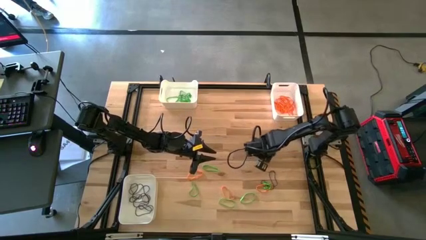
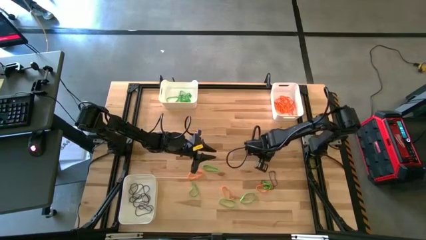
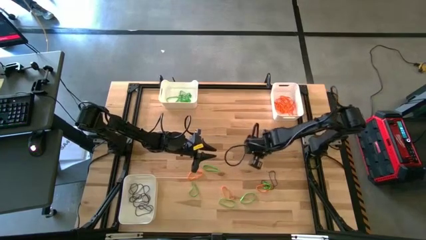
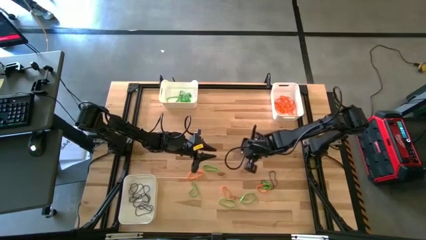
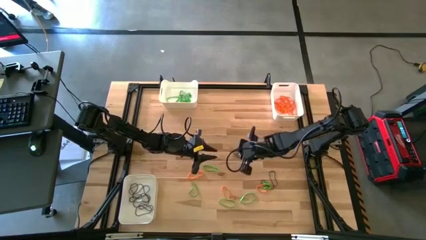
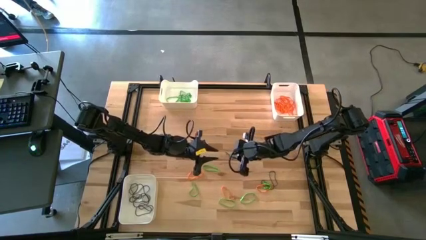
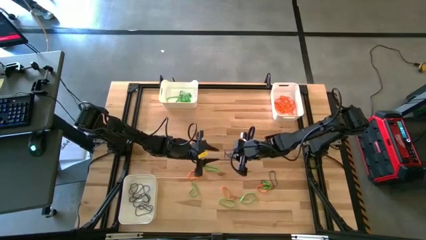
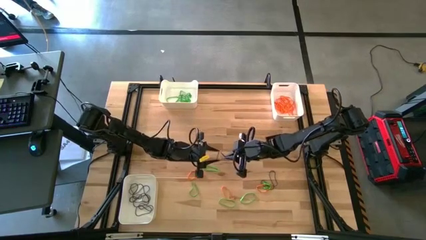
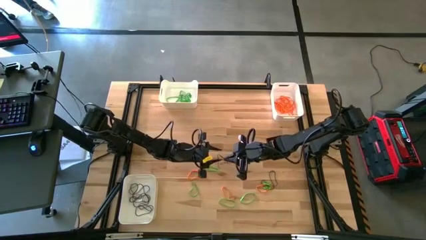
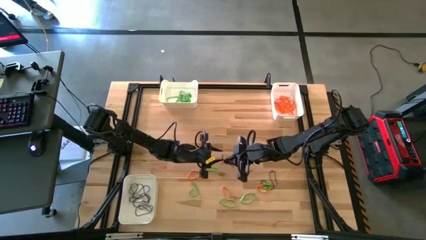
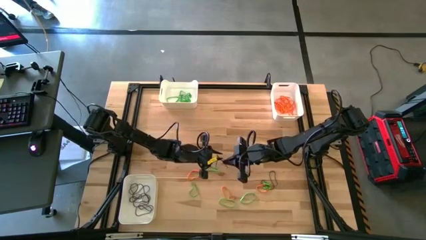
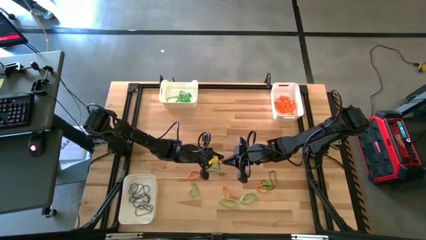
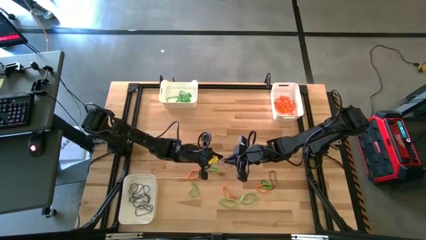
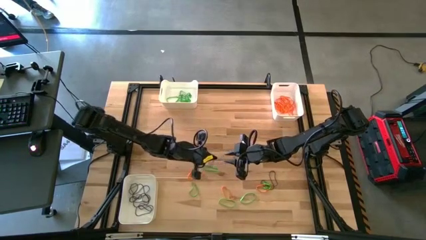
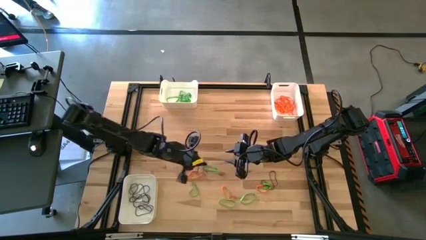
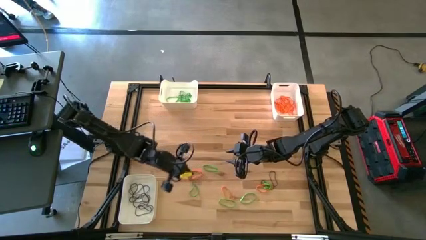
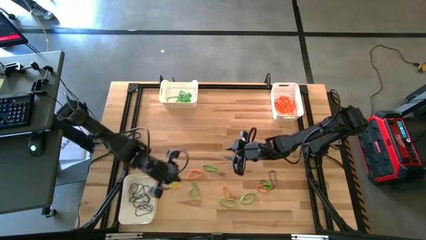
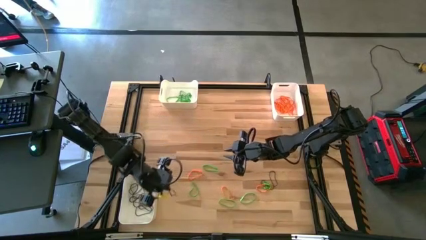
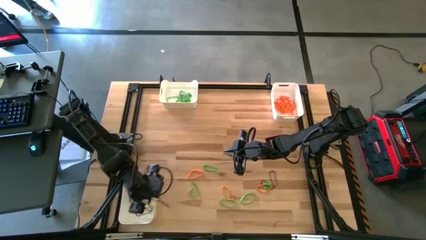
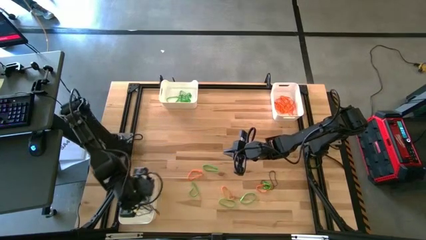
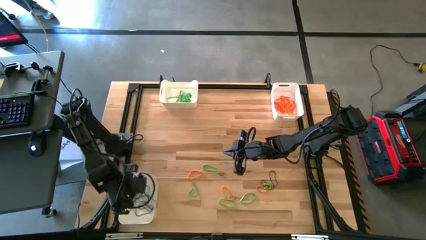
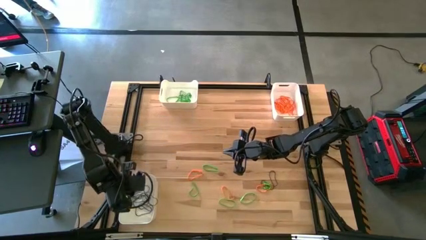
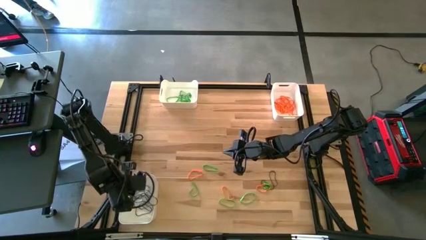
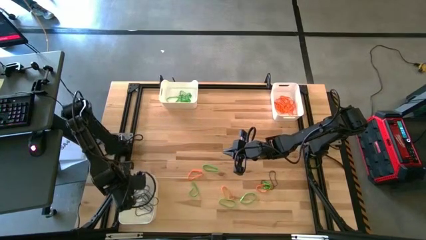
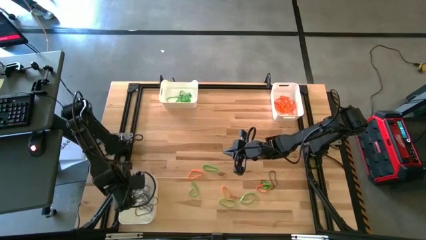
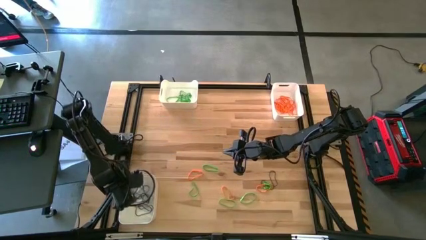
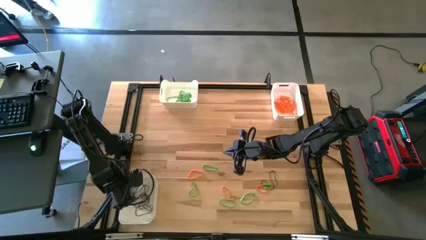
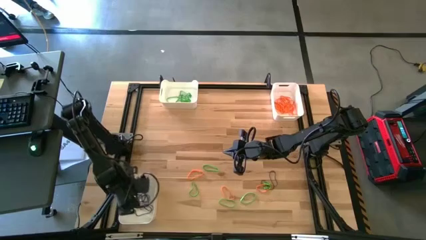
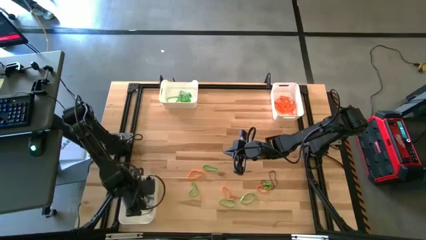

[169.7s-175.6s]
Task: Sort rubber bands into baskets
Put the purple rubber band into the bottom white bin

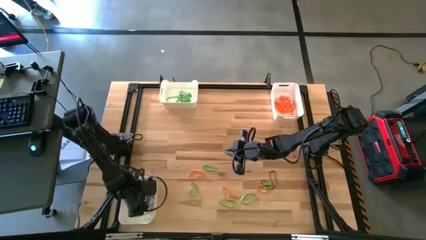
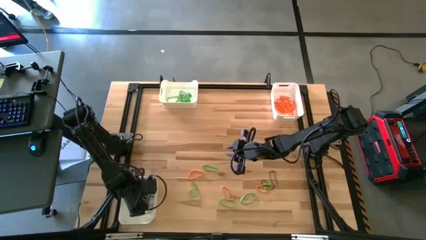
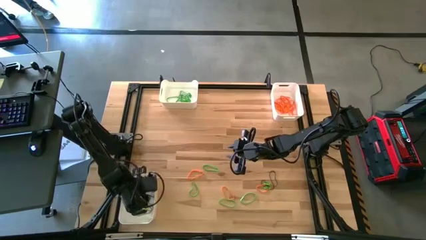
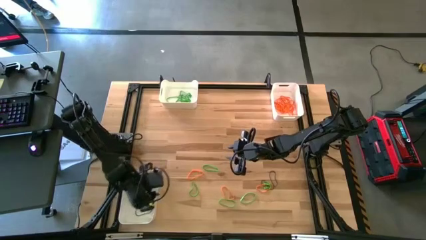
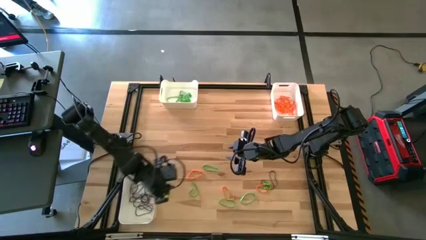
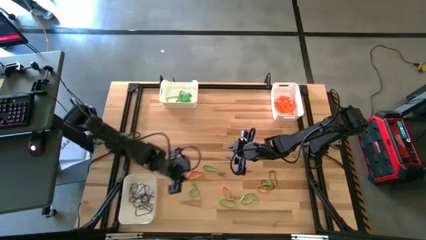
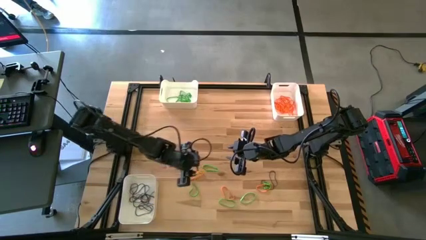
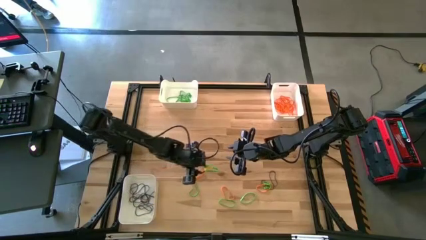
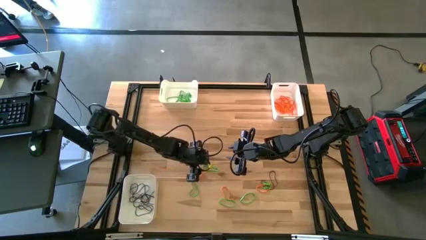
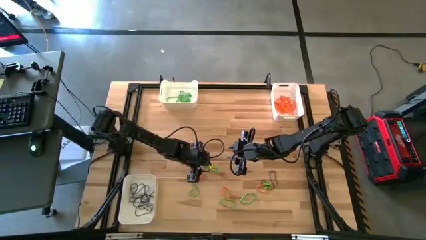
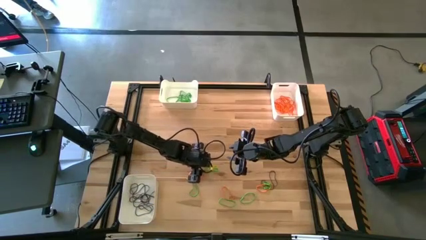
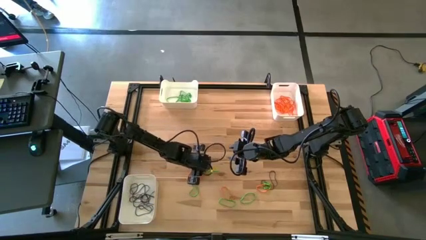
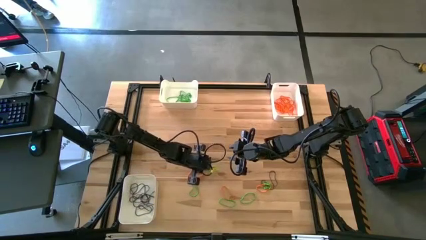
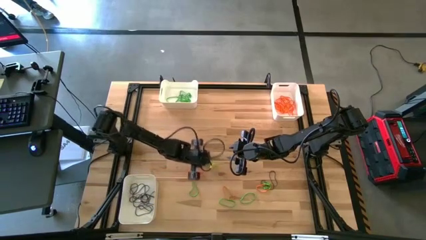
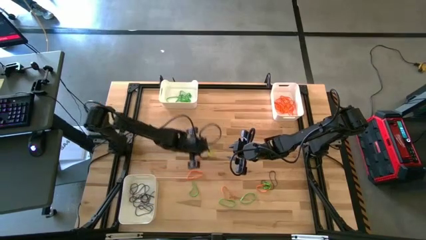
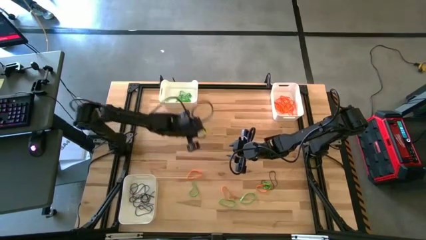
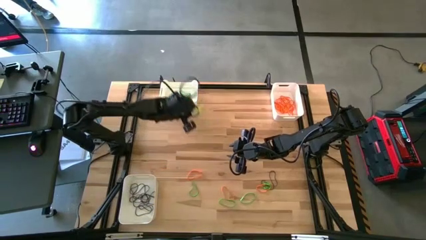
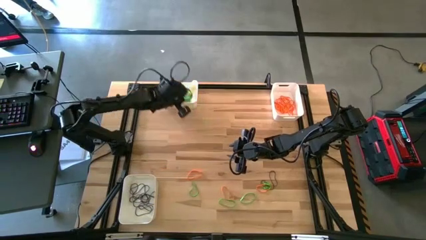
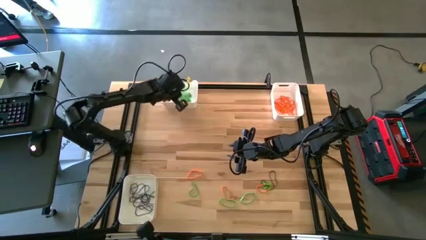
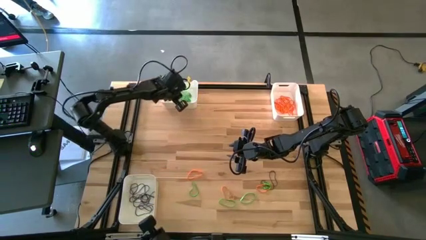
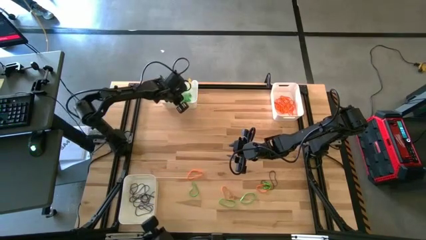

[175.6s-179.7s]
Put the green rubber band into the top left white bin

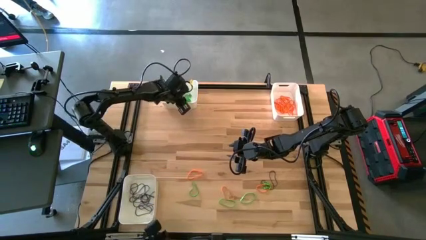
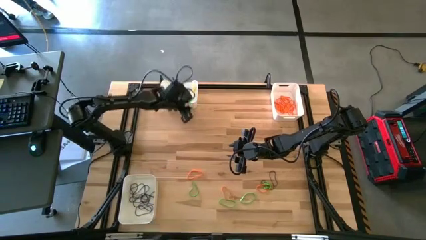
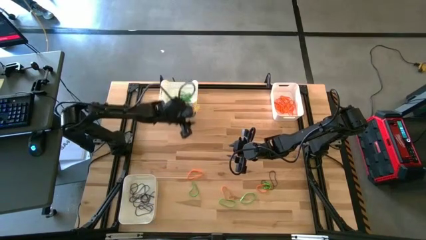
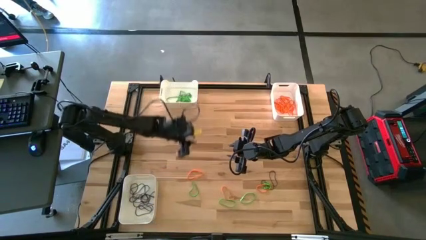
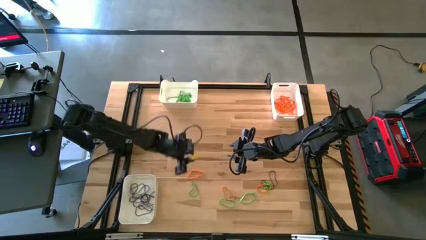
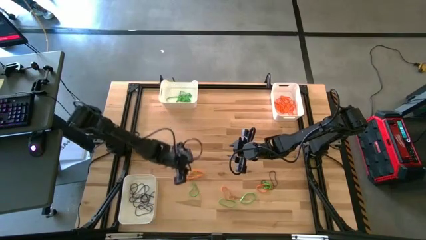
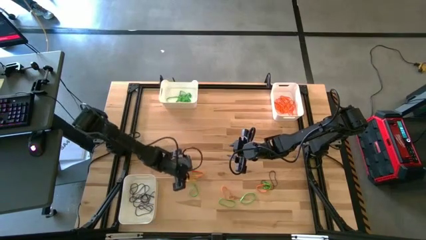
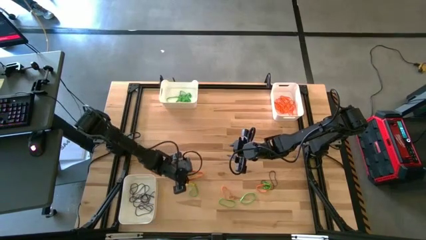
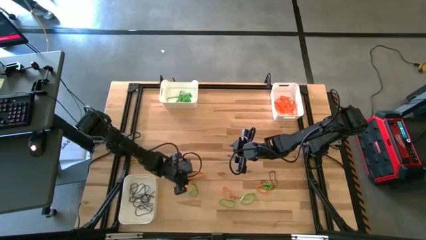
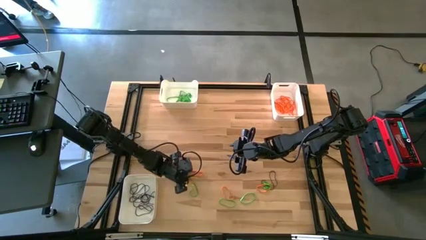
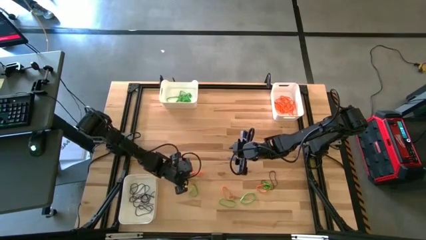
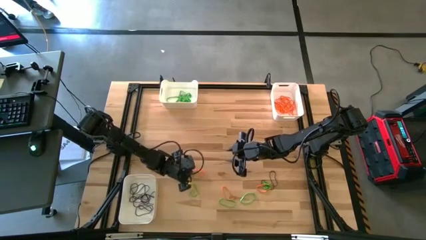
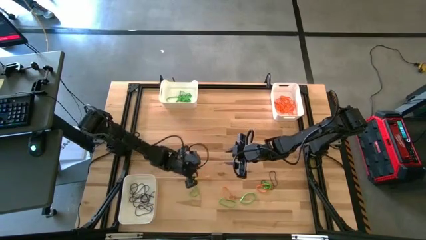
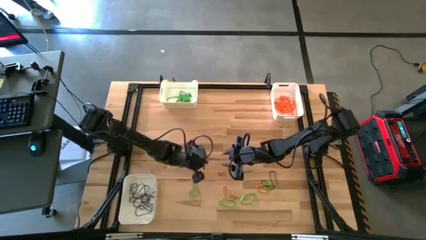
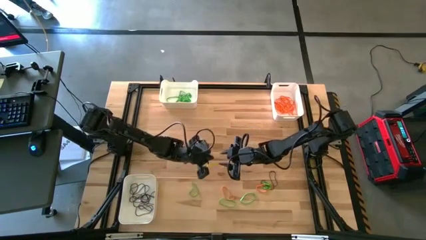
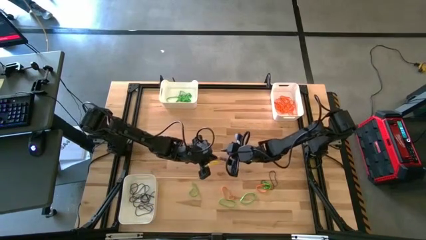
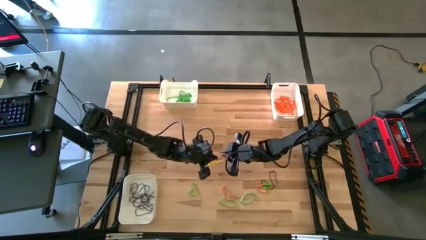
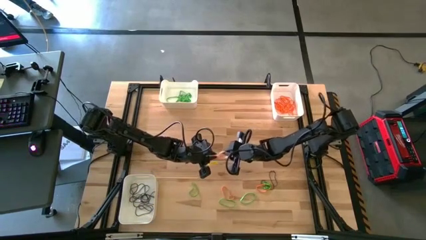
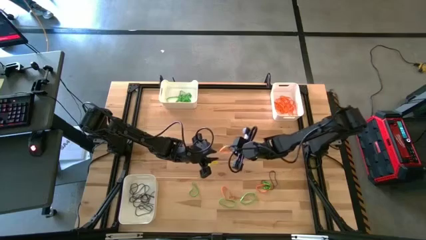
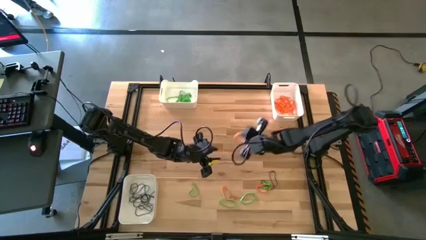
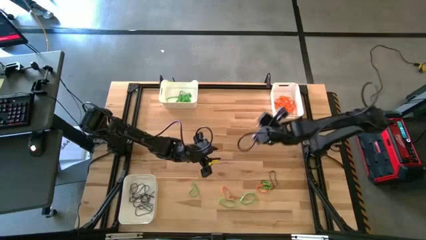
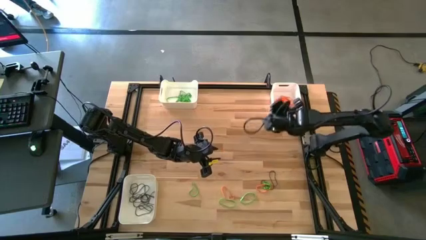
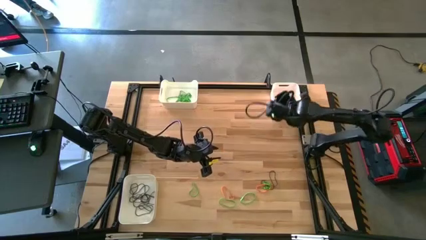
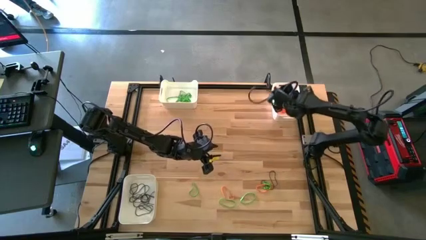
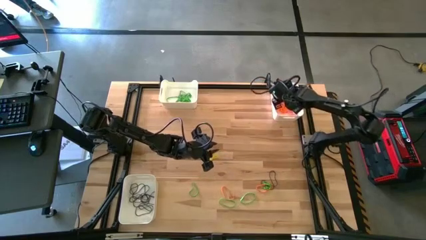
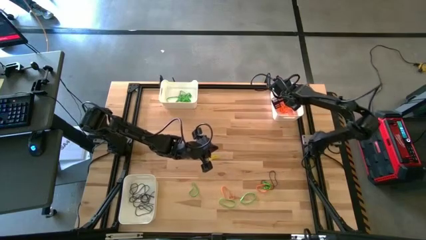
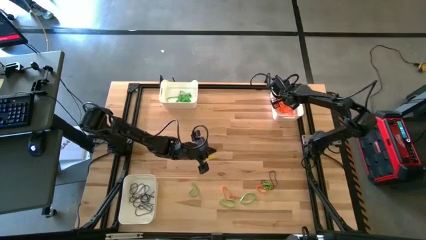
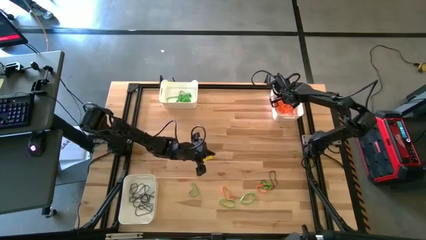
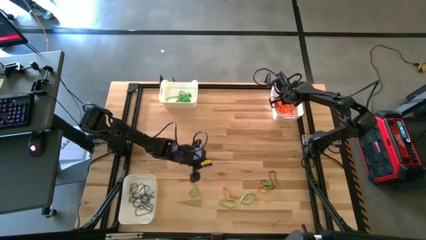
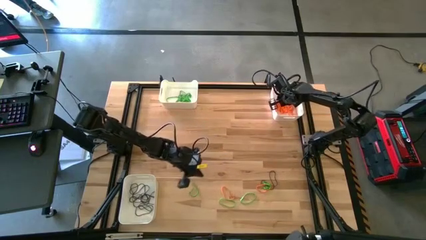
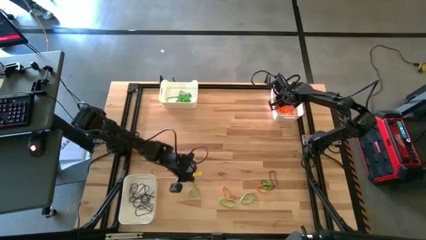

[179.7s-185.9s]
Put the orange rubber band into the top right white bin

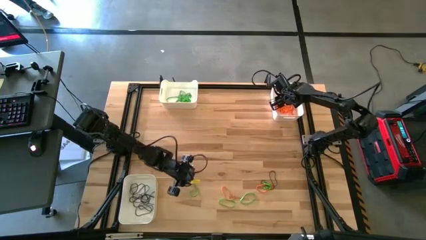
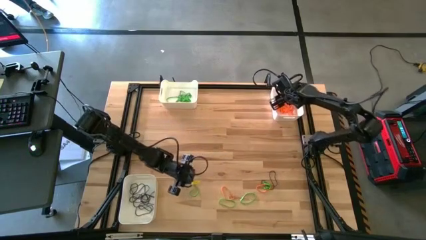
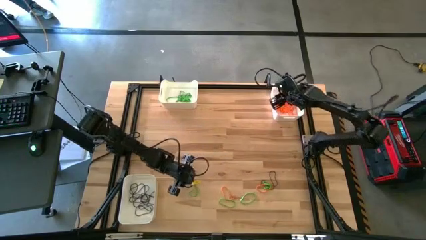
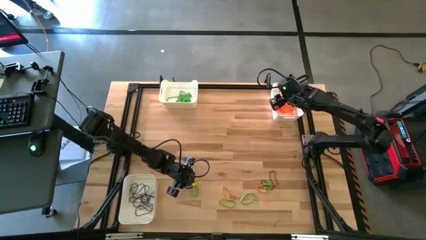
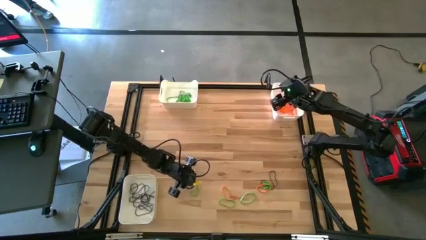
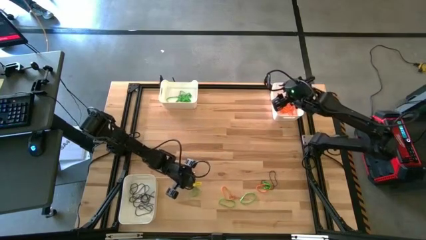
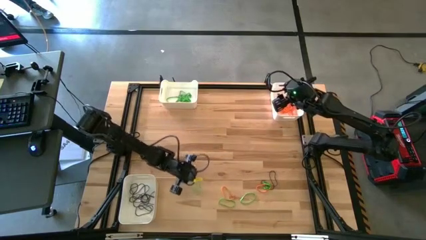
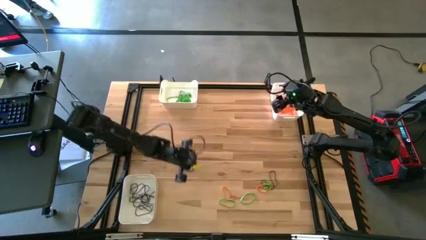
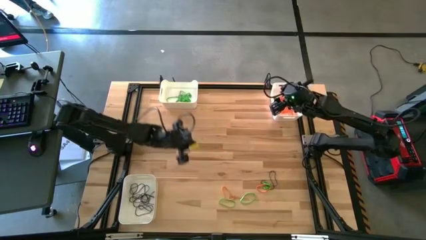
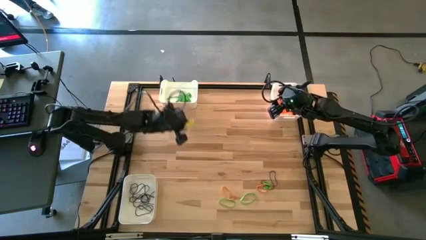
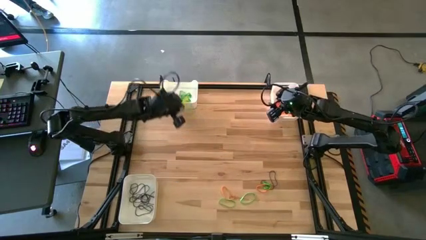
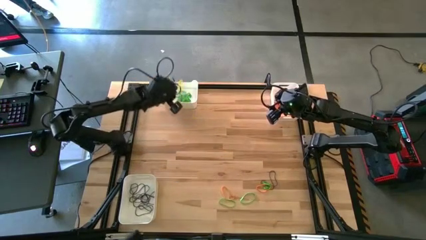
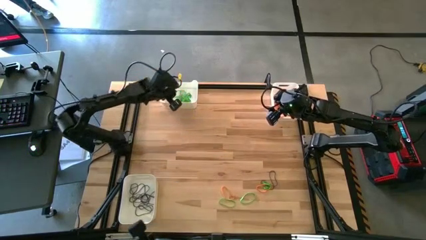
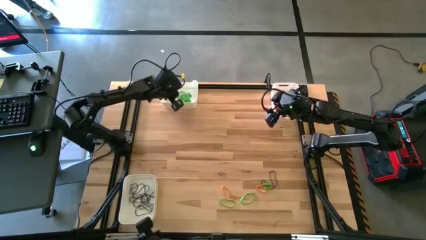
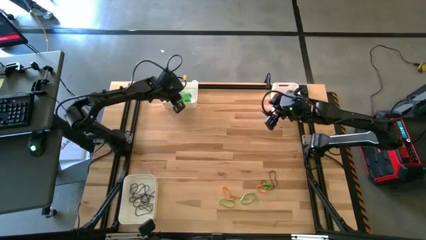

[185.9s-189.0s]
Put the green rubber band into the top left white bin
